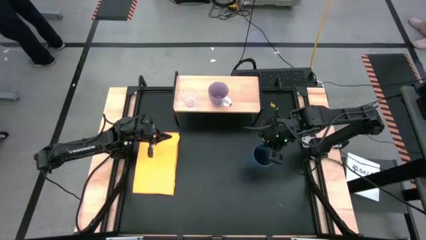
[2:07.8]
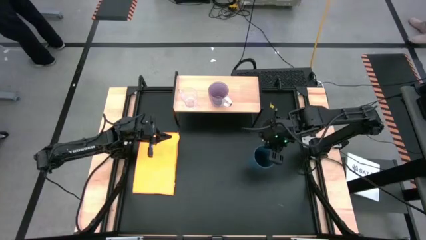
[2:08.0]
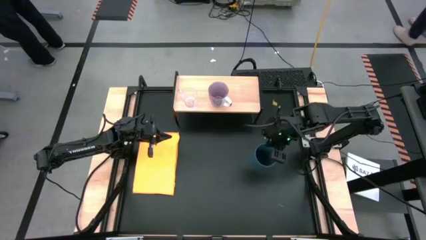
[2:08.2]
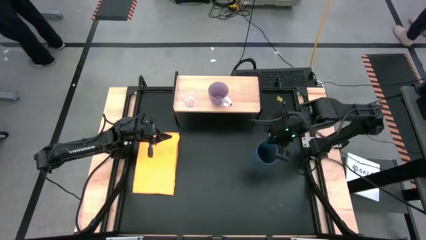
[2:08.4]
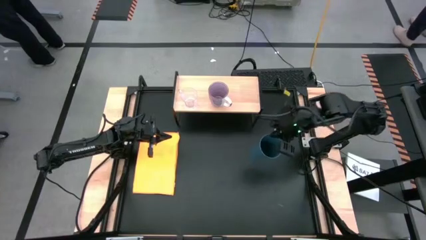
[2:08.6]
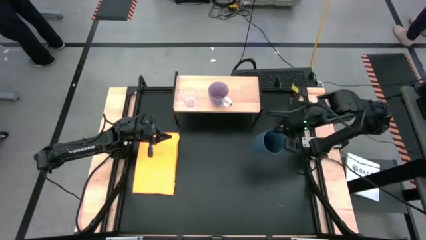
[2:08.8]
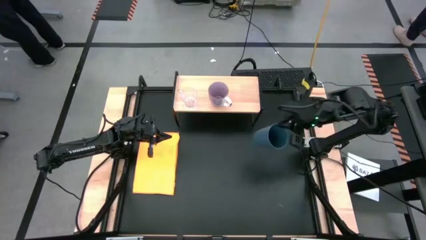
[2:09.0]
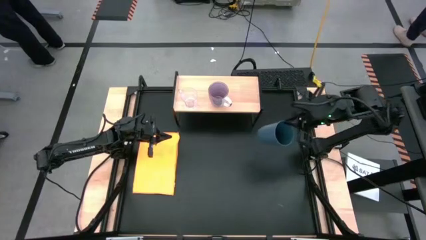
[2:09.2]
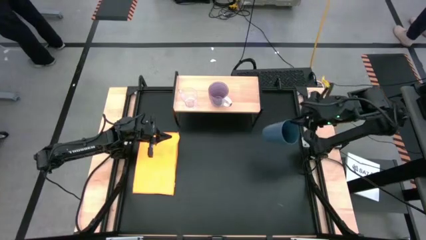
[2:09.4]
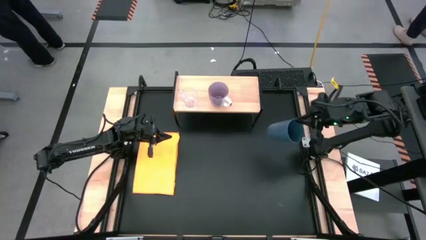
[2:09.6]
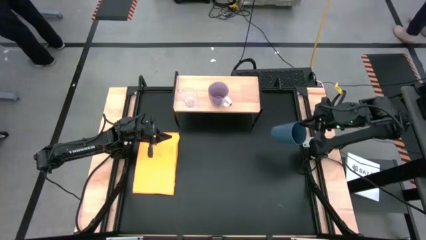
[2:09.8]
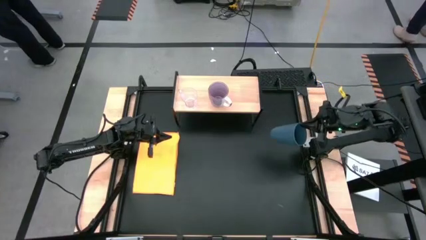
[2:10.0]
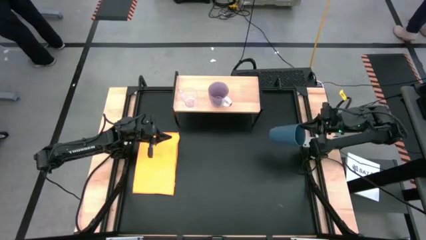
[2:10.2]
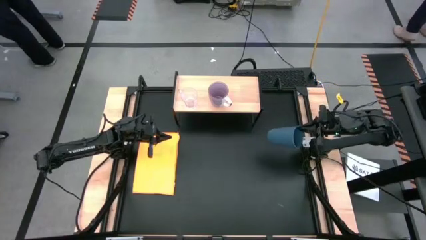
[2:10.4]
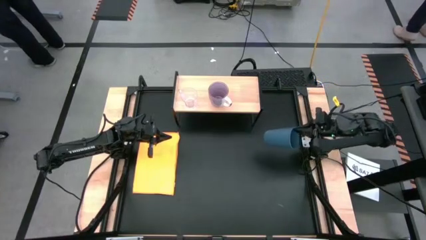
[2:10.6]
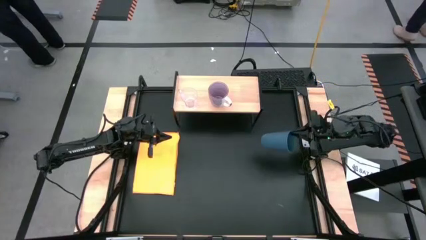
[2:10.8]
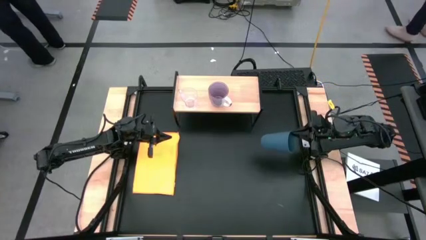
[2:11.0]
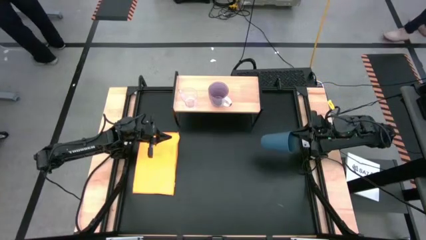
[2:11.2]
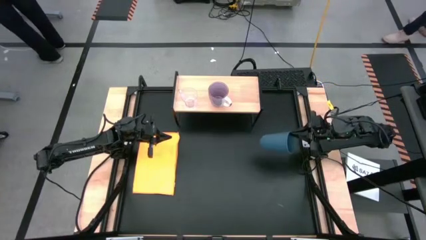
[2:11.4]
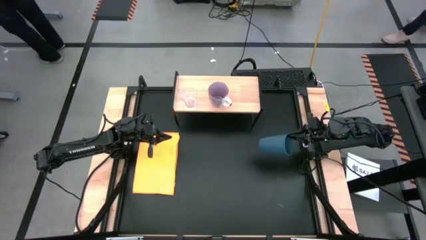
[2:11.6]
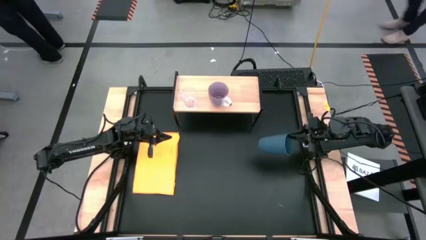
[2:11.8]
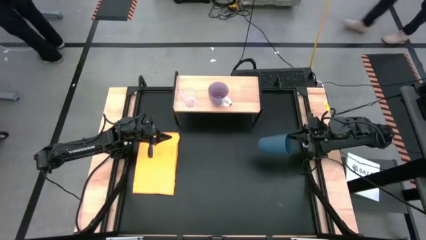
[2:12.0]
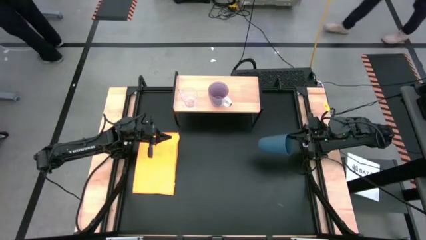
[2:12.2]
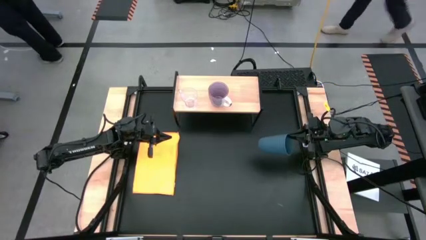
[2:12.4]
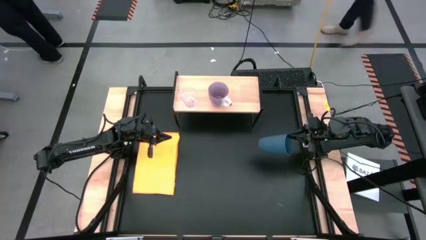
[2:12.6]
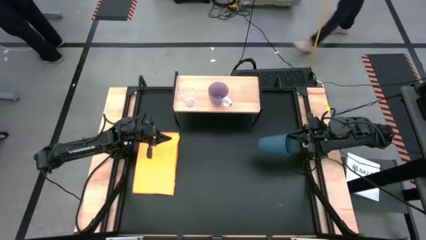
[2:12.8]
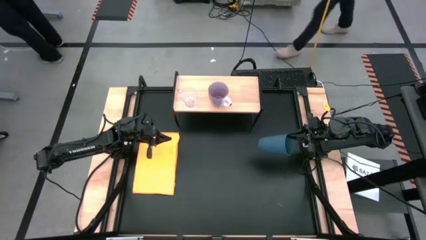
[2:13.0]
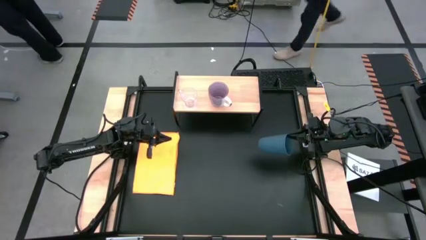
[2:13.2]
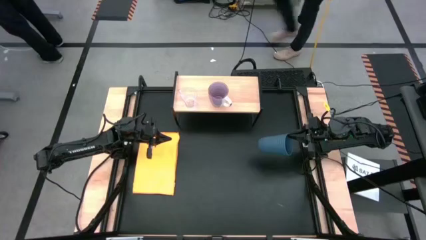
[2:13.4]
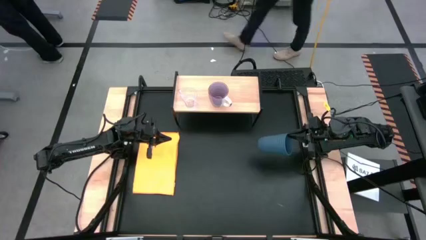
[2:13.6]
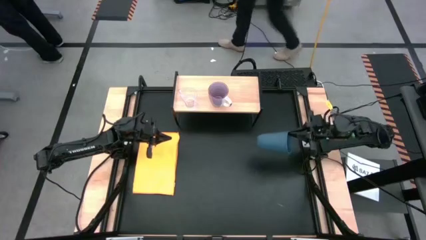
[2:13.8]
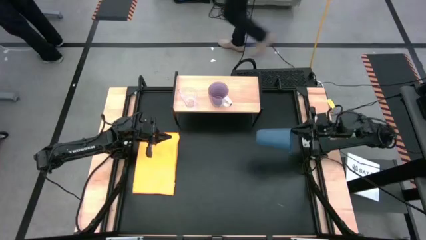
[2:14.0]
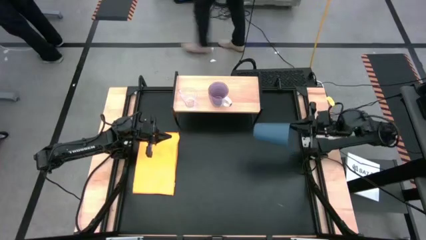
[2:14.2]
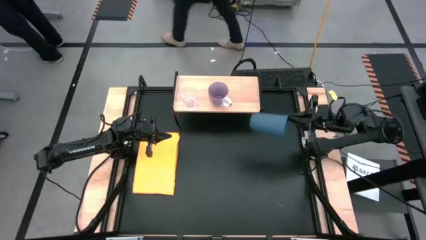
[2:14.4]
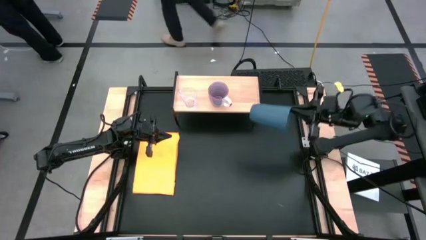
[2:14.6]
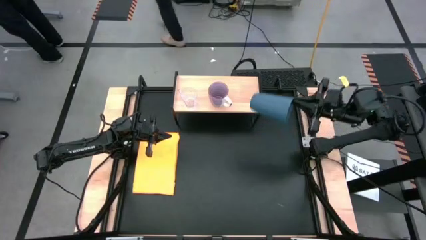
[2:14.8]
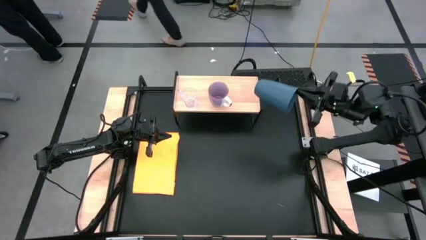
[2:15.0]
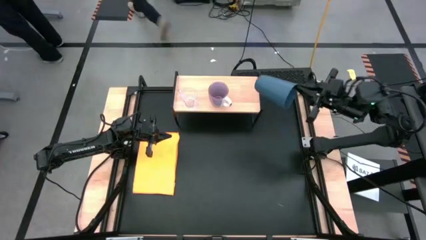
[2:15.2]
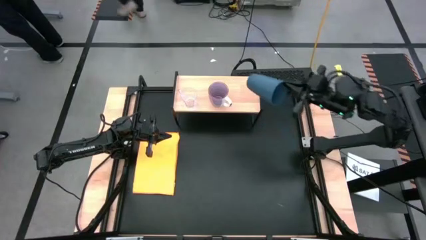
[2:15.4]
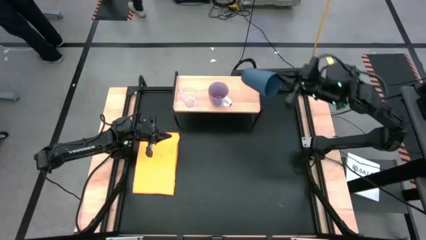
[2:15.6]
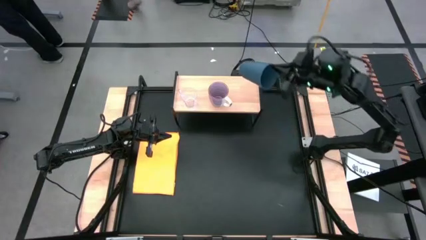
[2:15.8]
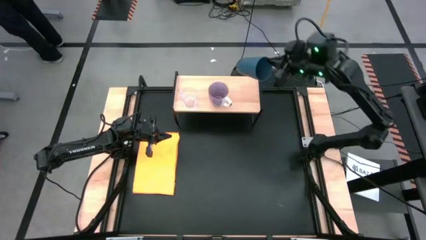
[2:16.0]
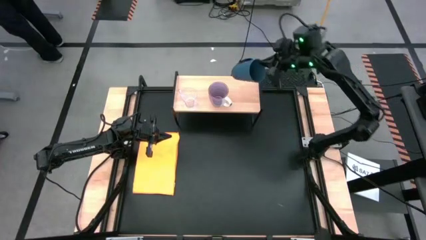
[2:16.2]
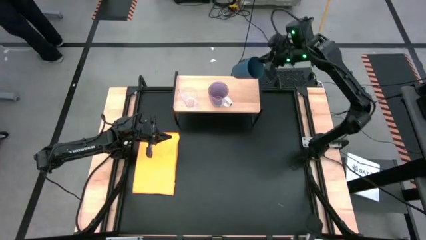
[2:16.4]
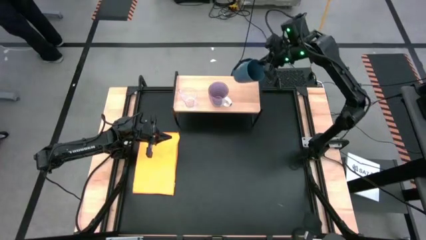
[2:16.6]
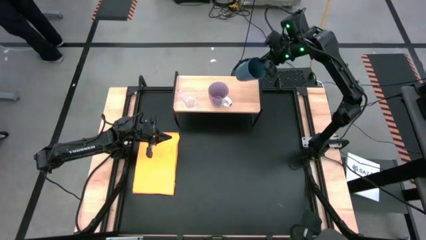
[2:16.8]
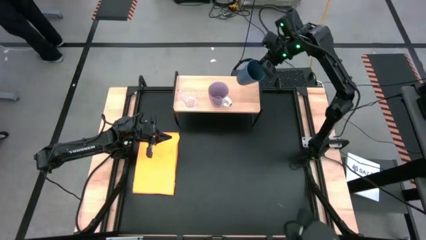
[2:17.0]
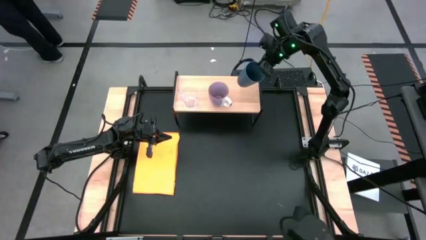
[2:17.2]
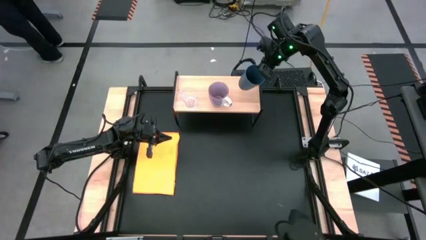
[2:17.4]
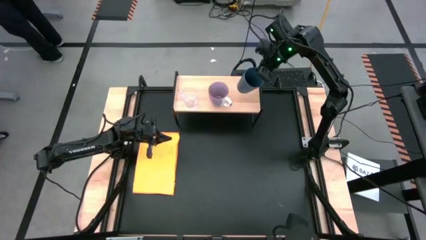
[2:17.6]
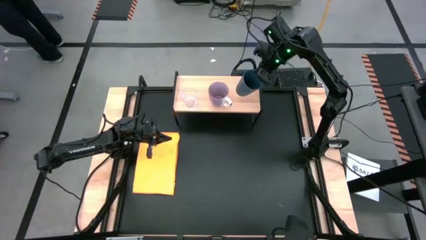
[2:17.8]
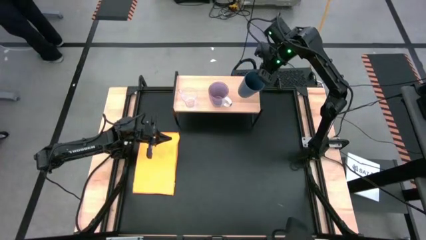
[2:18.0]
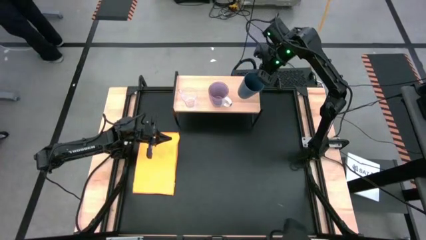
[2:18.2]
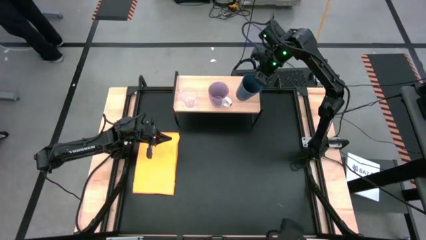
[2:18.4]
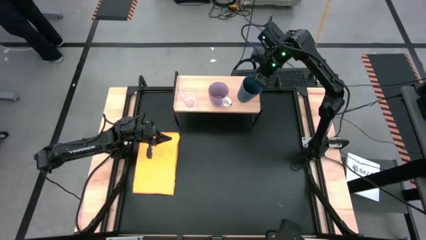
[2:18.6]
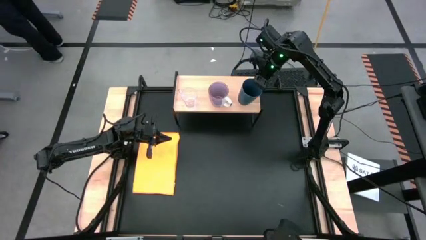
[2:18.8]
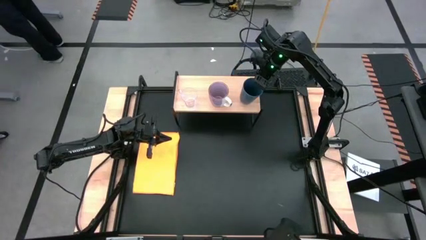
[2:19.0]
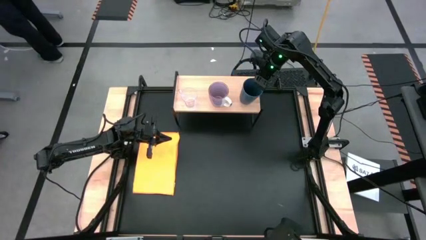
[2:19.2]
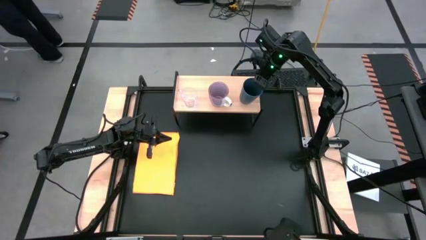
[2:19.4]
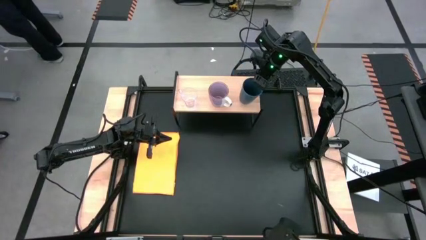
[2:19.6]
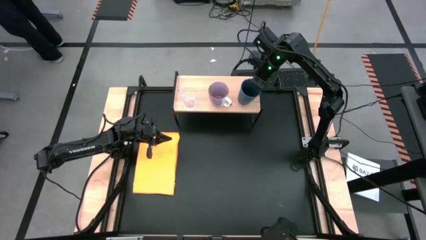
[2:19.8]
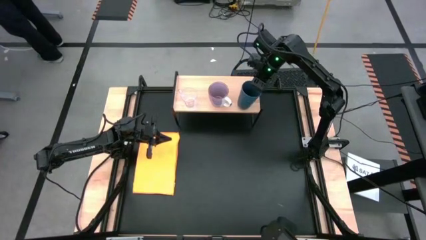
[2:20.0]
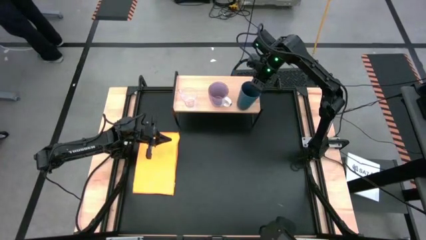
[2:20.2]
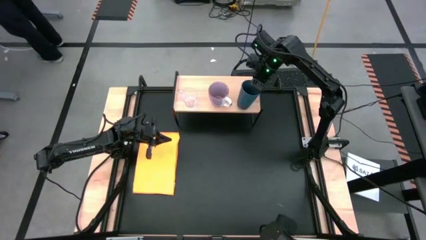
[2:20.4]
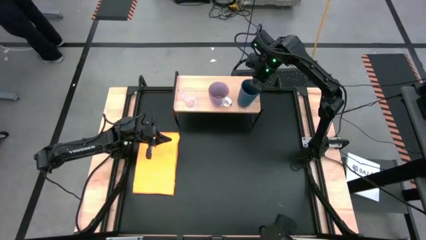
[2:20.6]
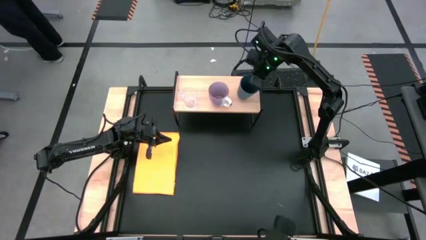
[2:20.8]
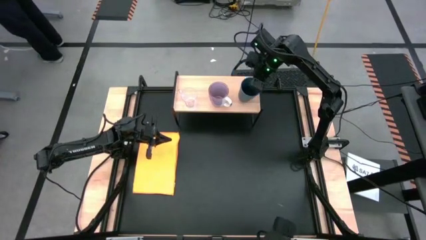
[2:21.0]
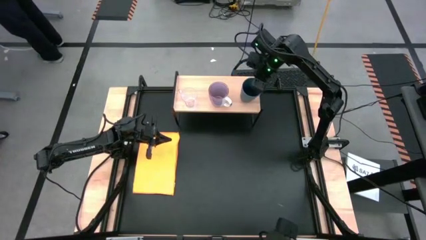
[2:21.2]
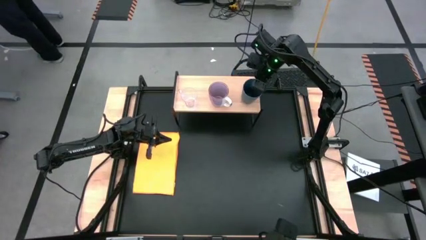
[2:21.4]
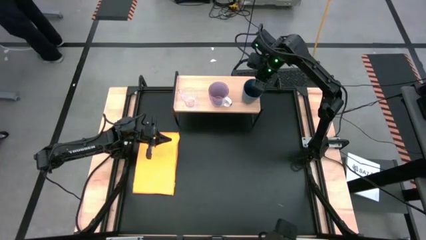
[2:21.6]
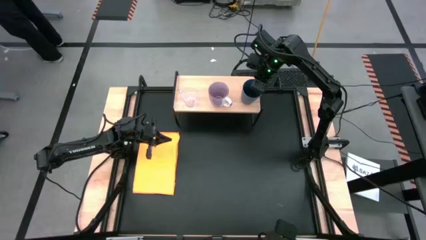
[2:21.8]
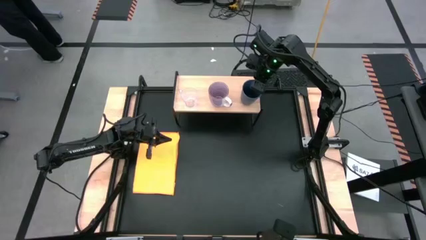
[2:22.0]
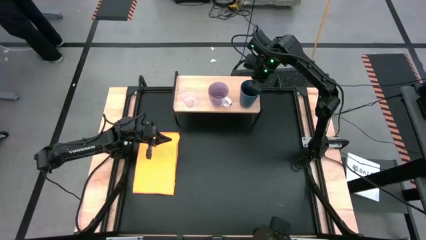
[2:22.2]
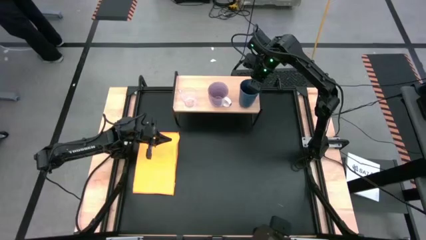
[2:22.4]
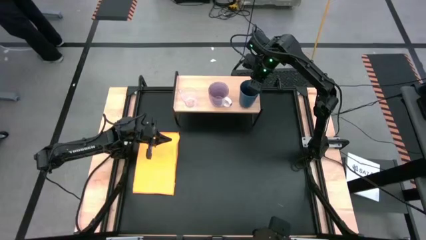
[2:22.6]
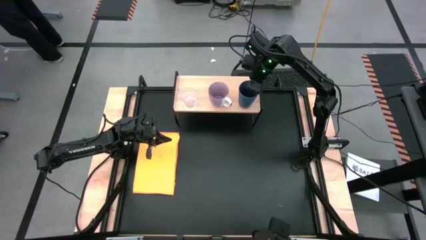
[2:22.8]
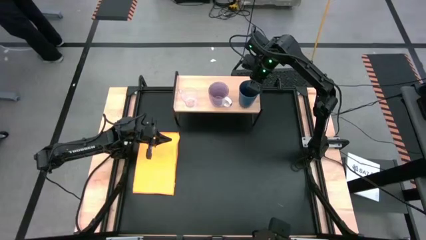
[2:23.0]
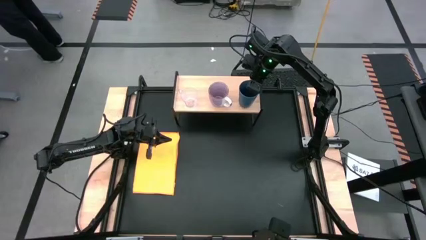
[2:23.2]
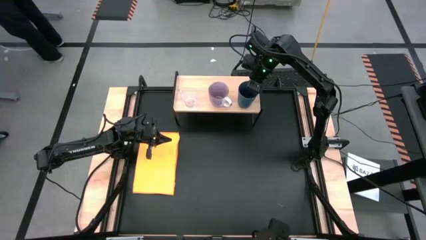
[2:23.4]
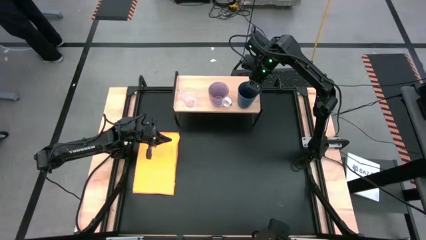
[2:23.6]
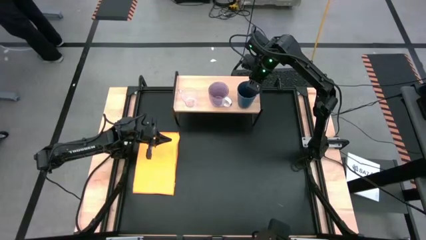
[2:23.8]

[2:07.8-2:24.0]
Task: Stack small to large cups/mugs on shelf
Put the blue cup on the shelf
